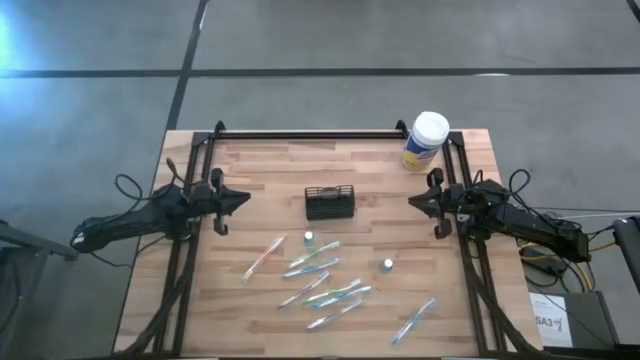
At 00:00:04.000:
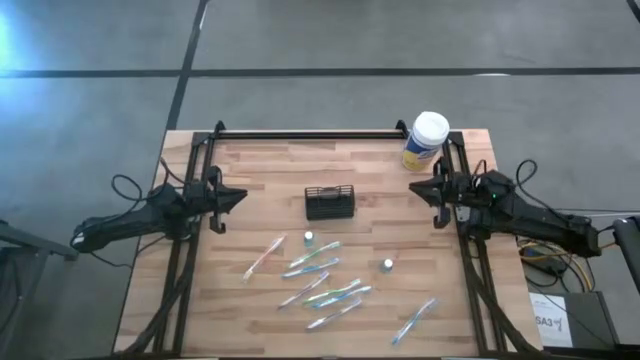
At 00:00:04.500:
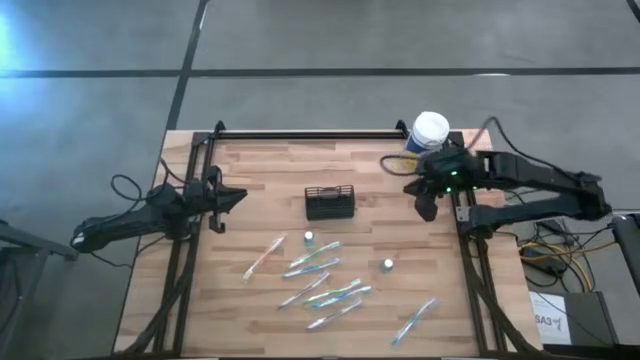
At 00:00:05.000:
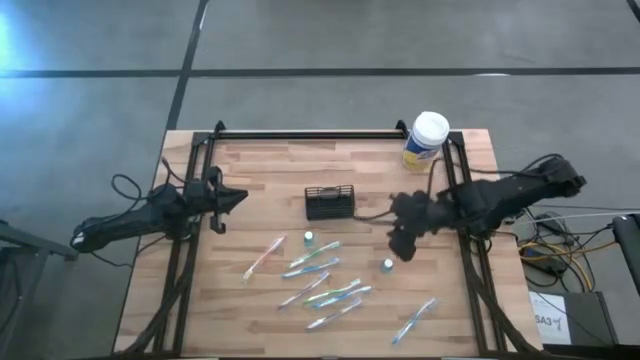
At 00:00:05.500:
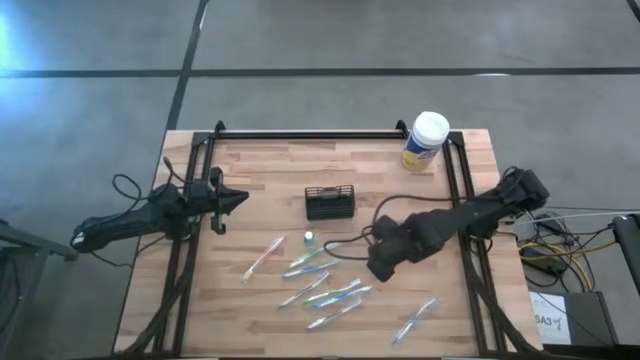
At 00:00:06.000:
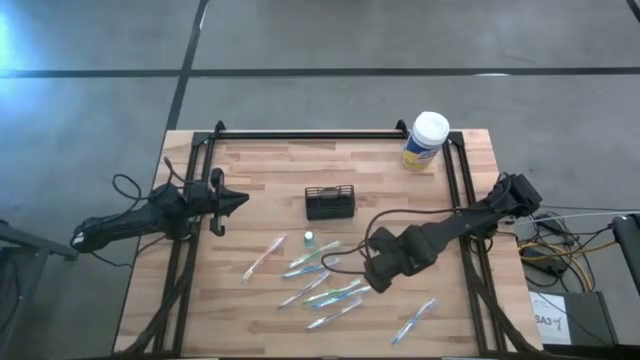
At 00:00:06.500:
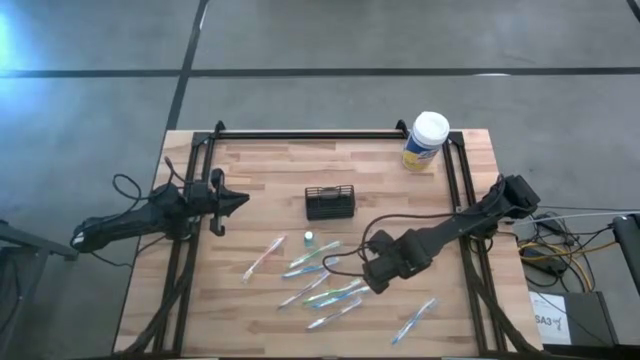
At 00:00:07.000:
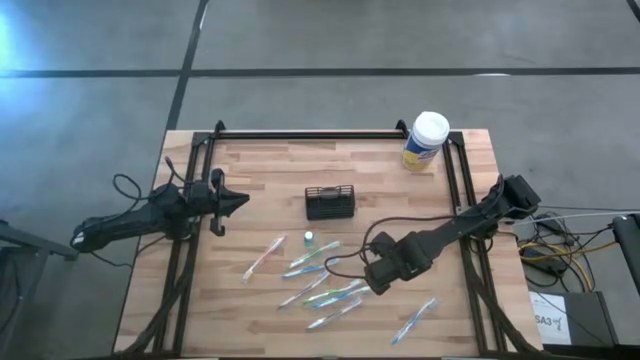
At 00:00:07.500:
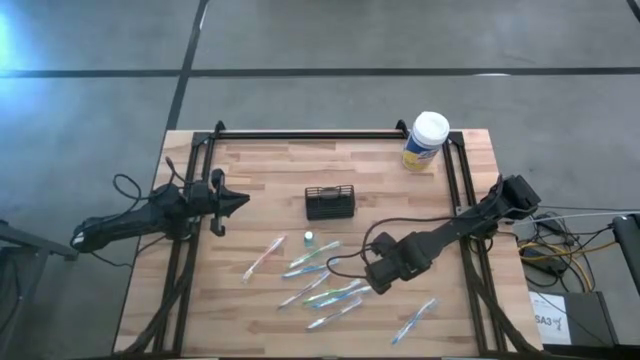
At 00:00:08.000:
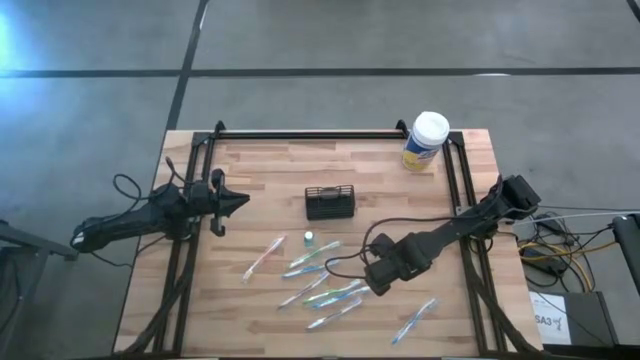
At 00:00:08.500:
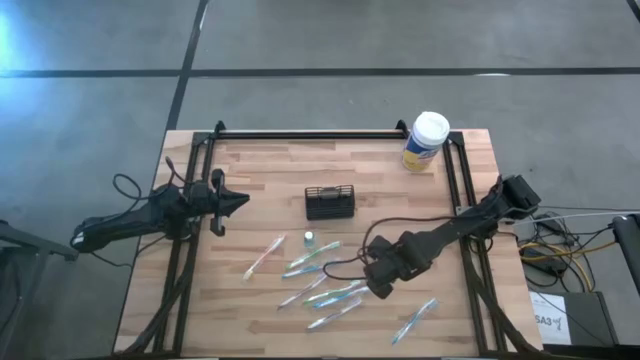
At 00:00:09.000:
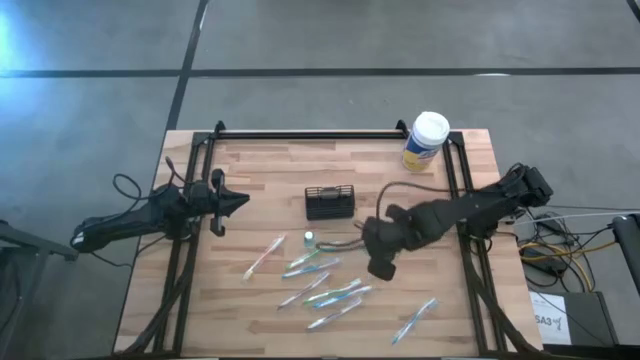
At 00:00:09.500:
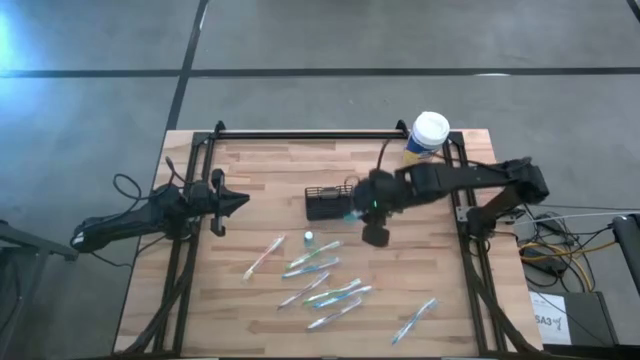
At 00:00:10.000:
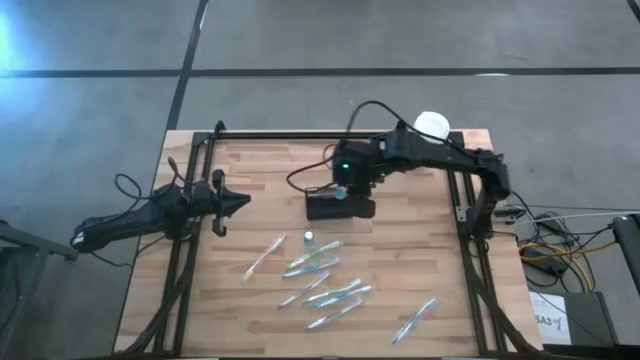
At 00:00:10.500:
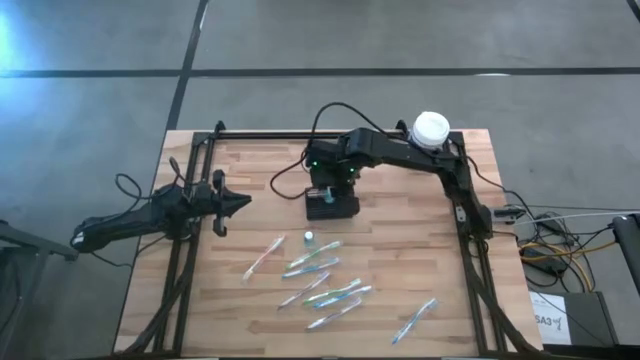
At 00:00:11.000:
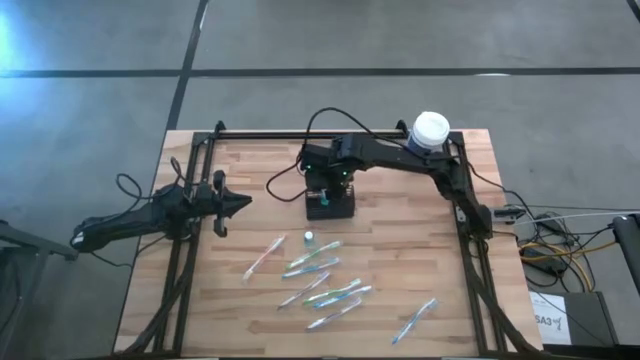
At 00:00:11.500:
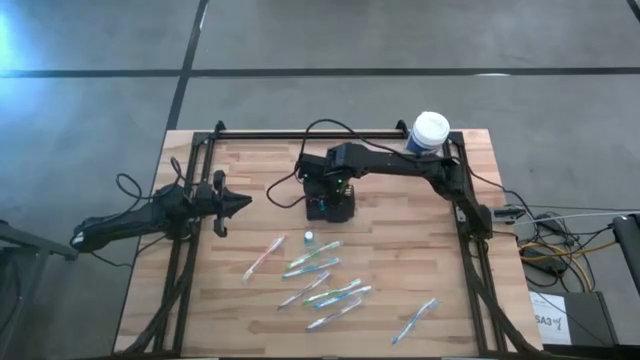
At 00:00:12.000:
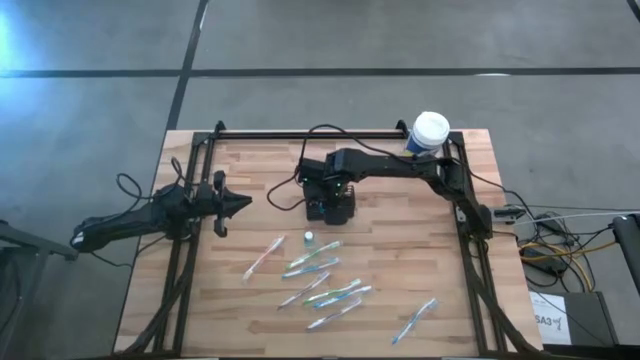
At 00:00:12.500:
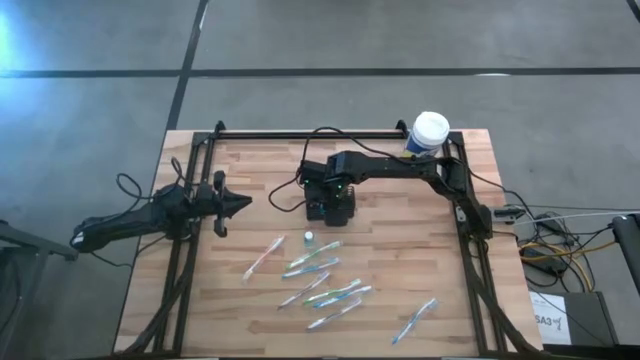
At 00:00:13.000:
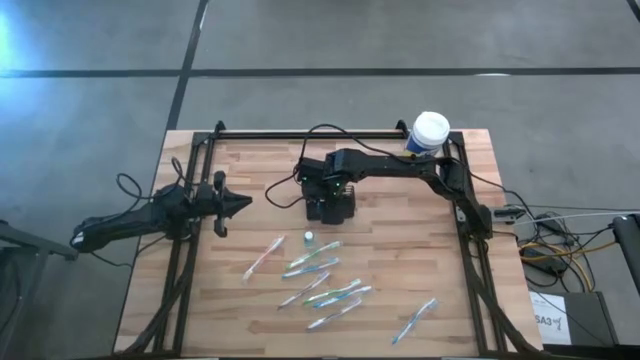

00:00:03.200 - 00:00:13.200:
Task: Pick & Place toothbrushing station
Put the right blue mouthwash in the wire organizer

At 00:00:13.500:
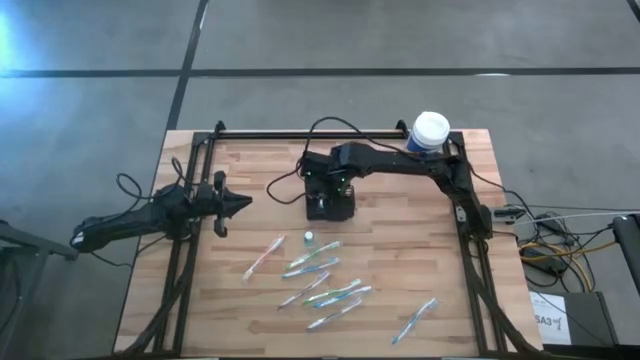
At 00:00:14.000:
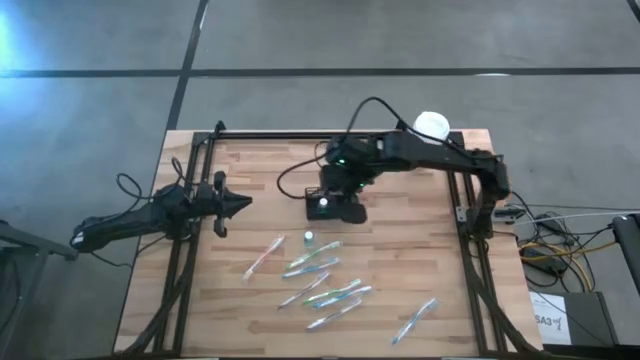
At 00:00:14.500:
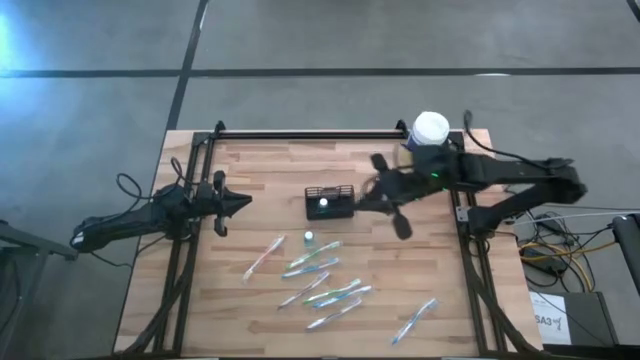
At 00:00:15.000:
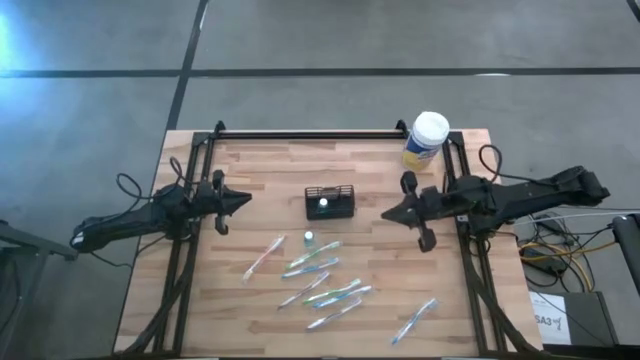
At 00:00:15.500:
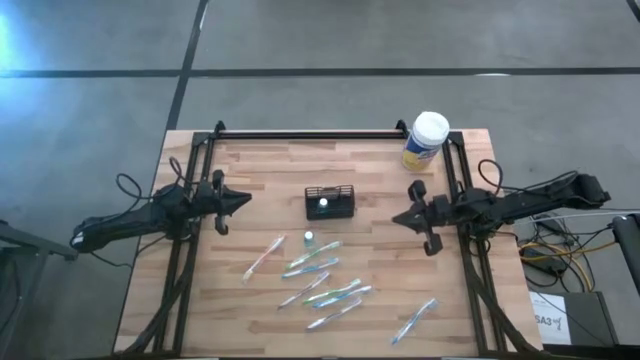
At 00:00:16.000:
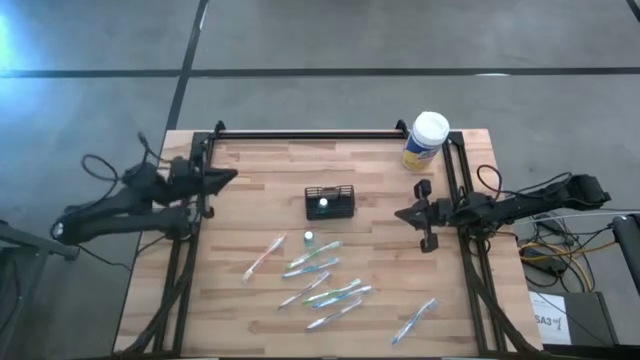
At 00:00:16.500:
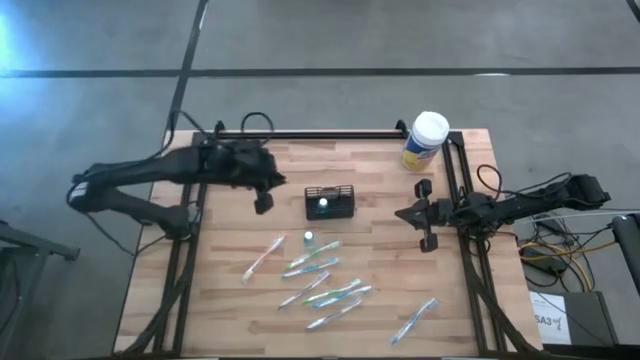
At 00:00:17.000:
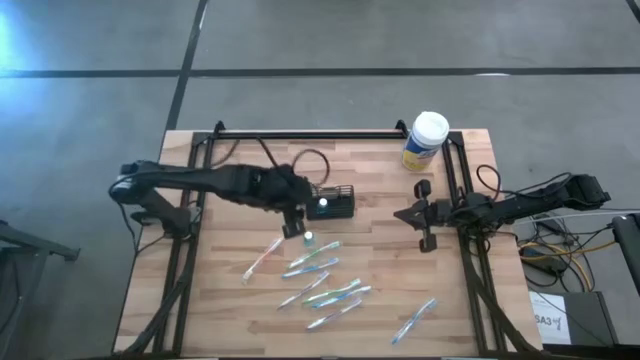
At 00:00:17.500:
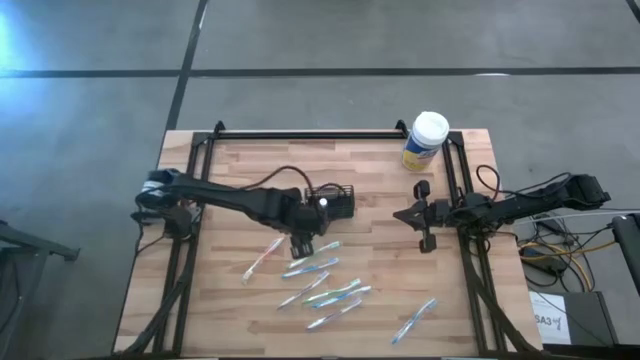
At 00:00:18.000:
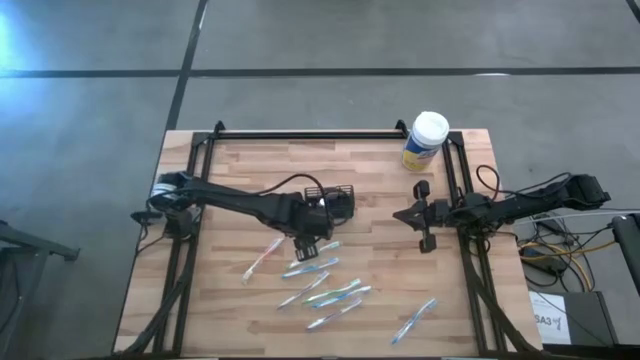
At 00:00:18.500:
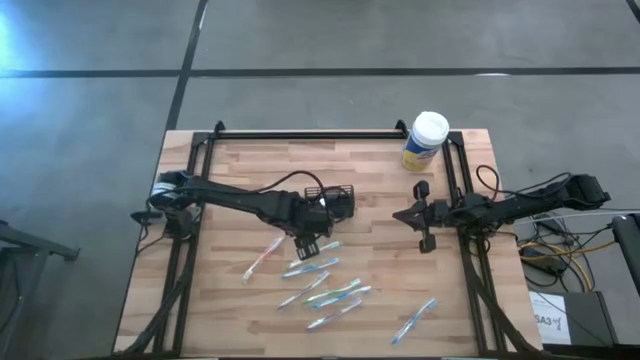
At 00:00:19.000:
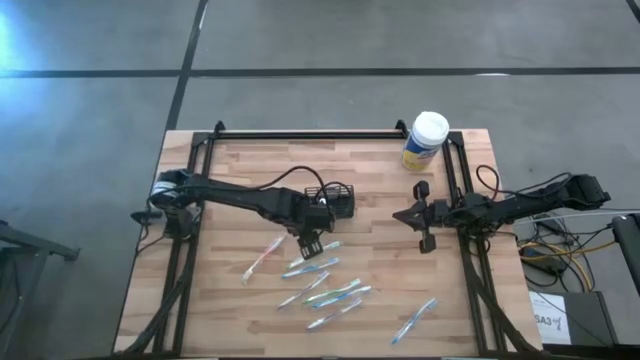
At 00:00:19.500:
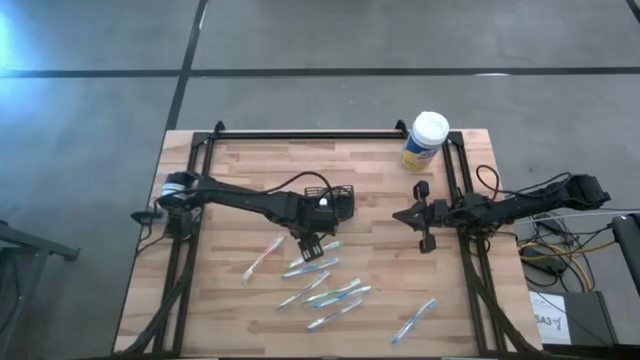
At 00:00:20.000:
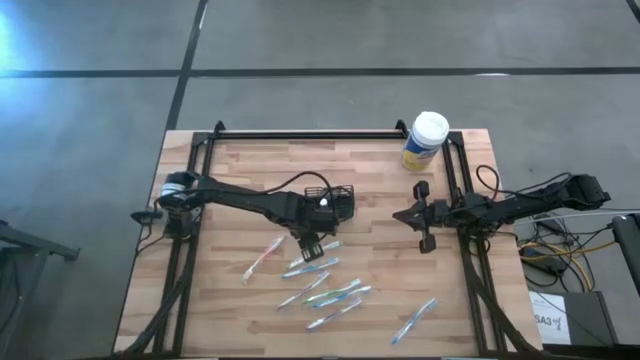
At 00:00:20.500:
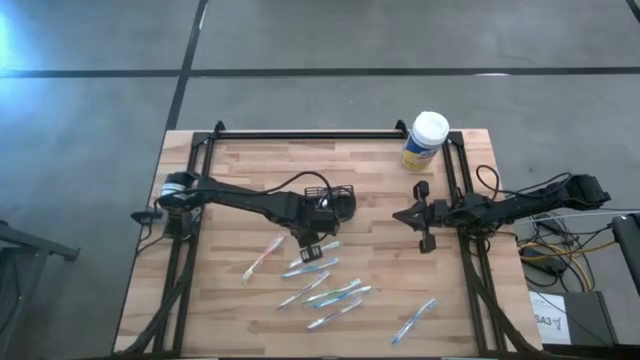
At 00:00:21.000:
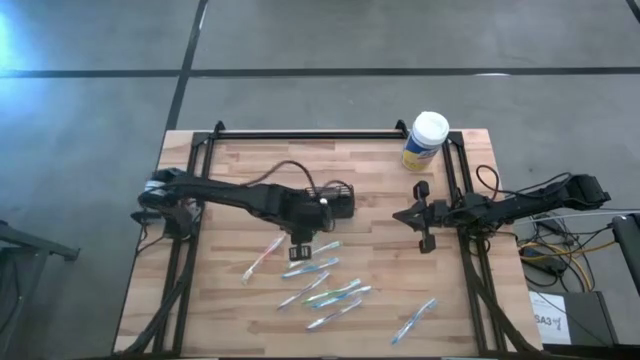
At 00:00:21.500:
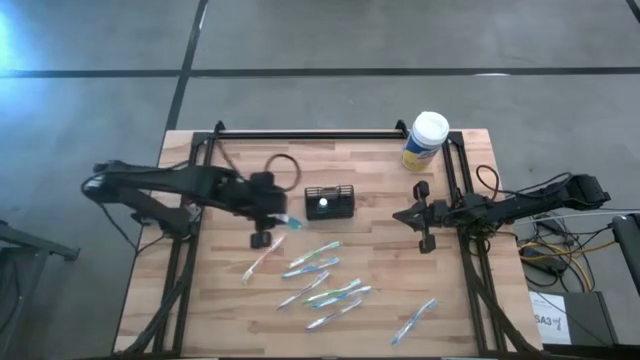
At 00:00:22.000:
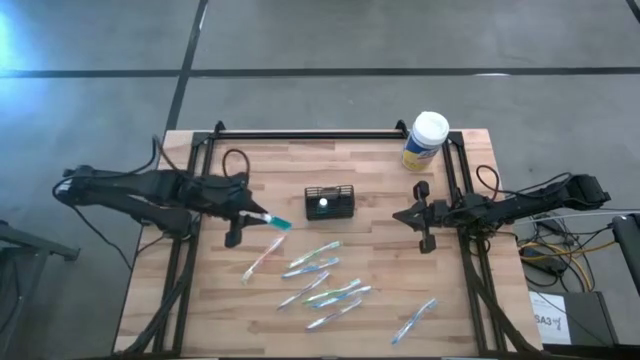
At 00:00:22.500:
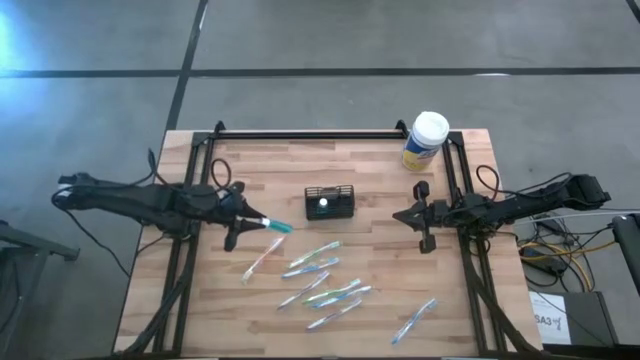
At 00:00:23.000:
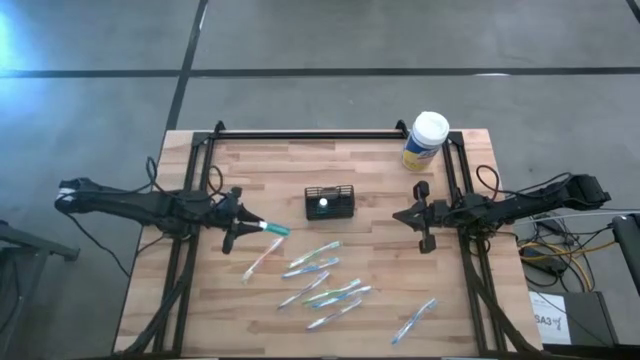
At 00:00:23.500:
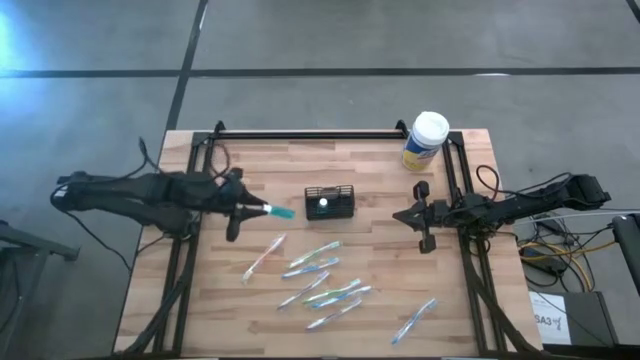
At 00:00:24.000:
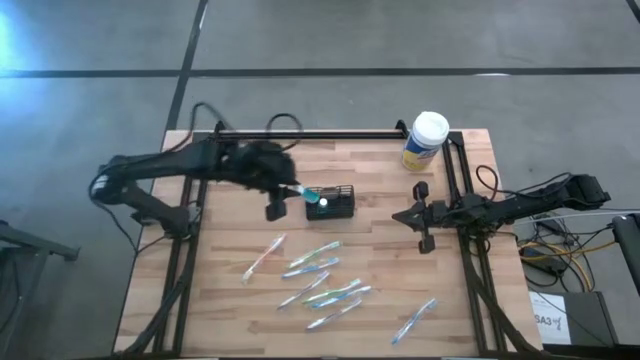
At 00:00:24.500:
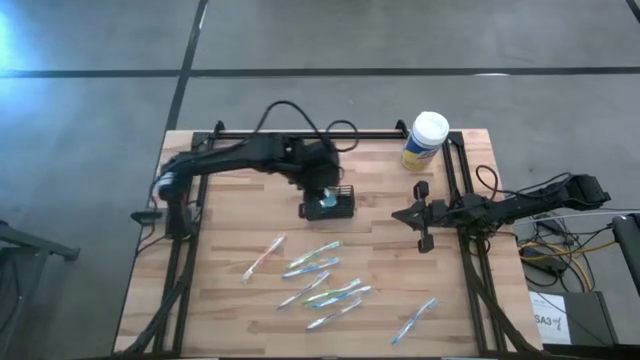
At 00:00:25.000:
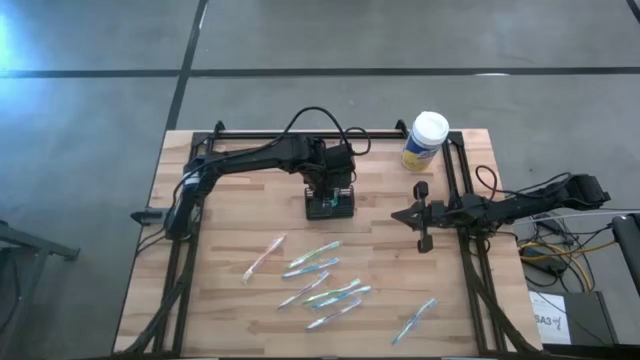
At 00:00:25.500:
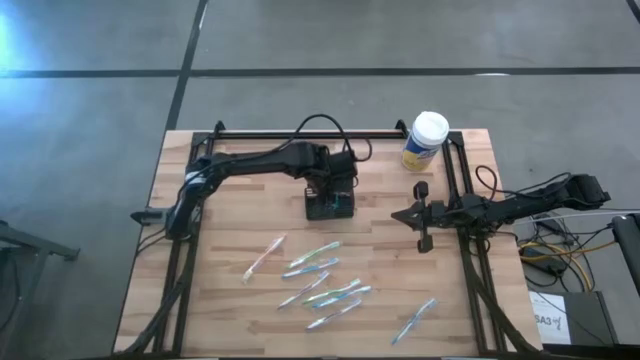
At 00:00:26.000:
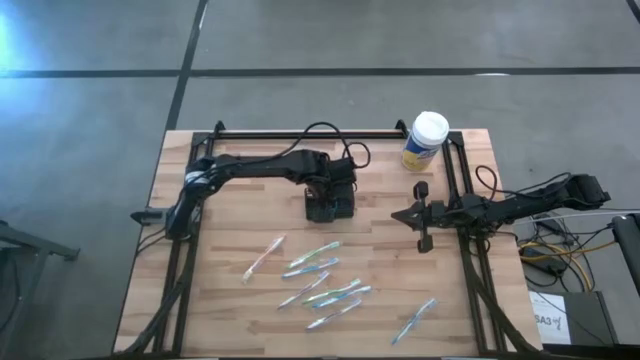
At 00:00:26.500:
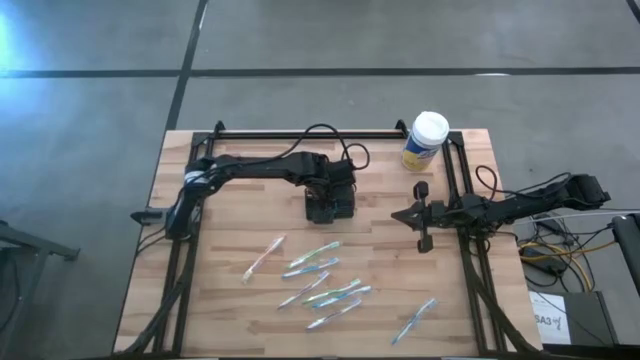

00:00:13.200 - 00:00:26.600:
Put the blue mouthwash in the wire organizer
